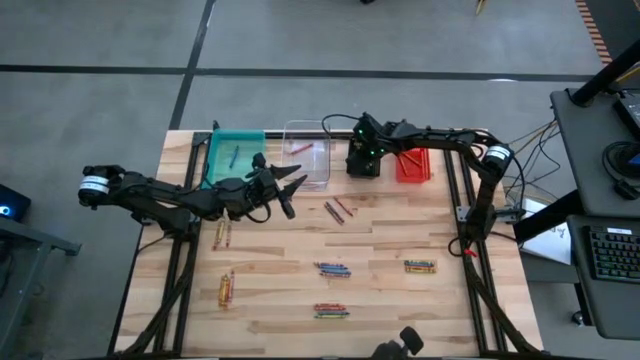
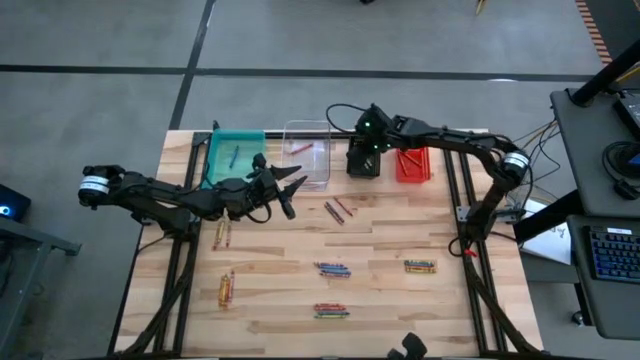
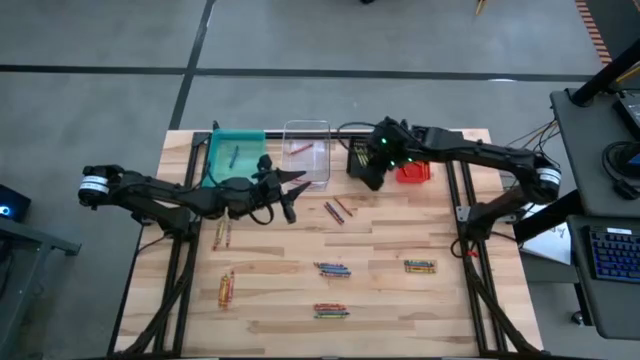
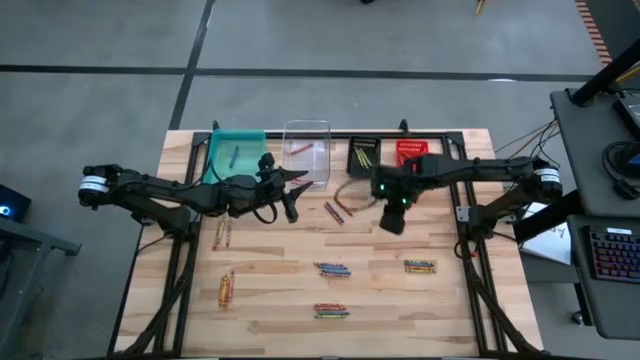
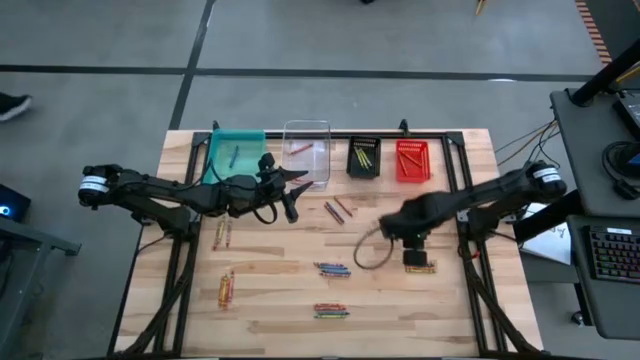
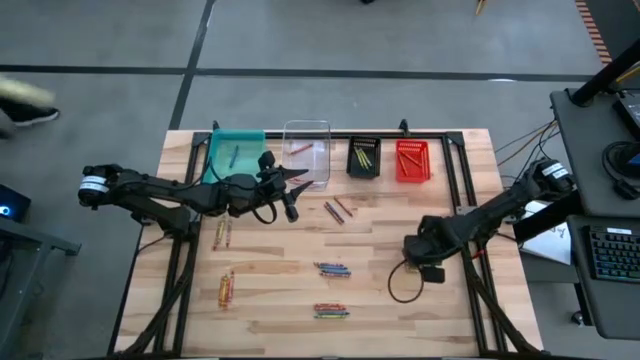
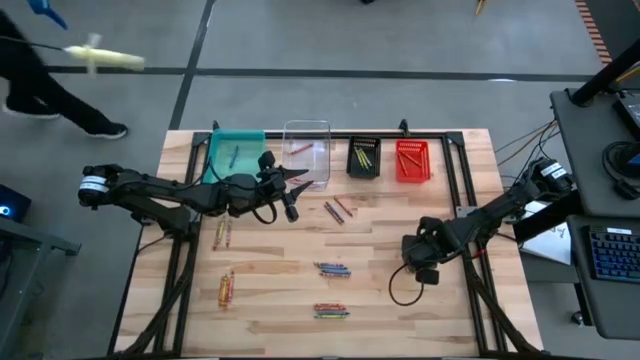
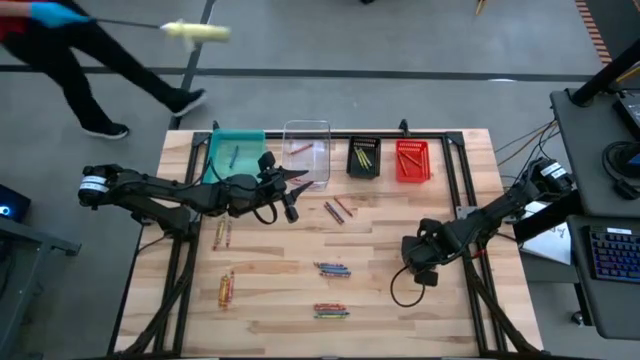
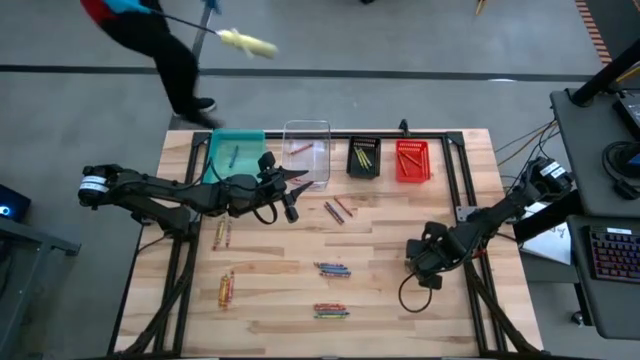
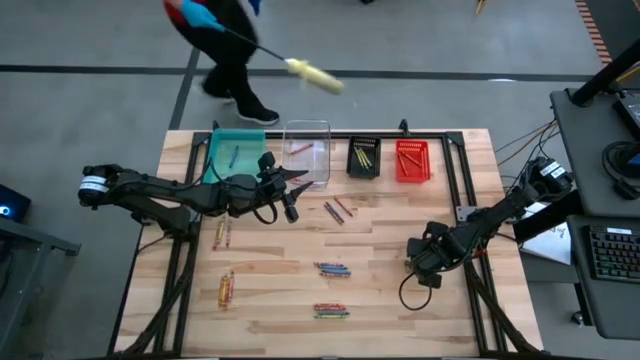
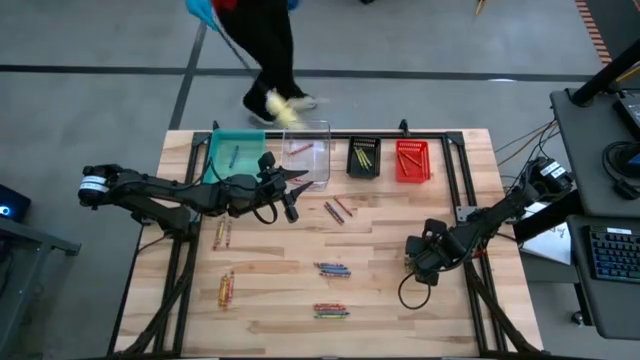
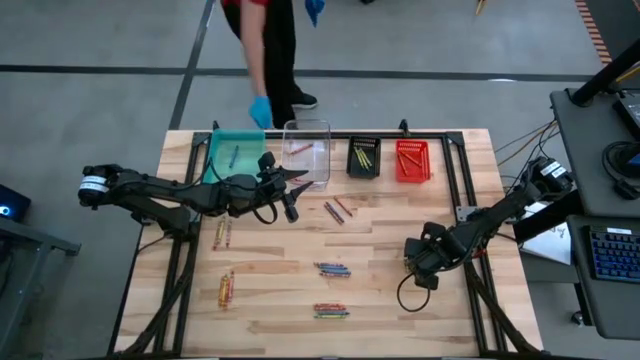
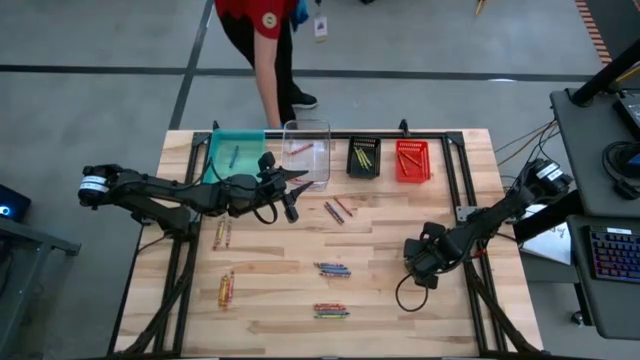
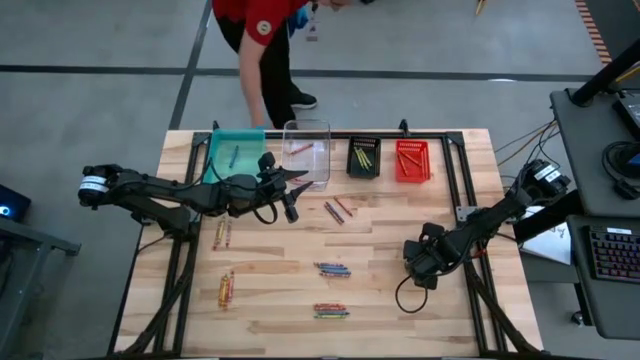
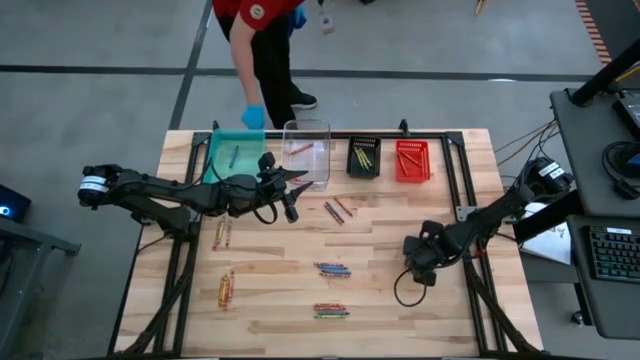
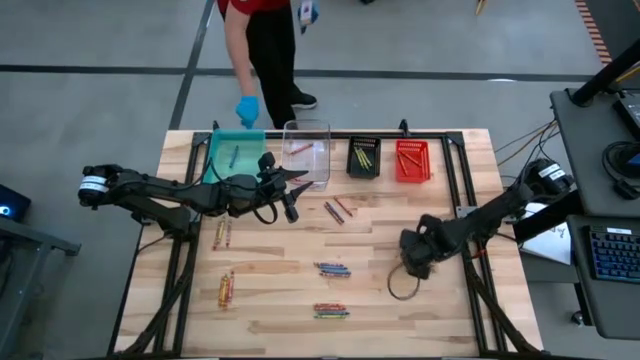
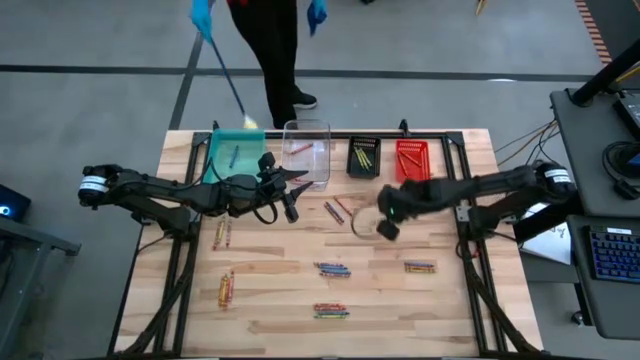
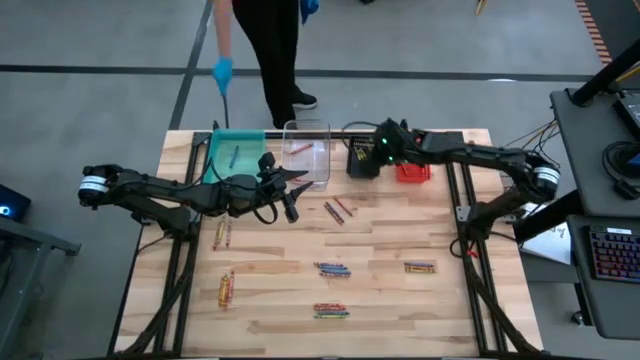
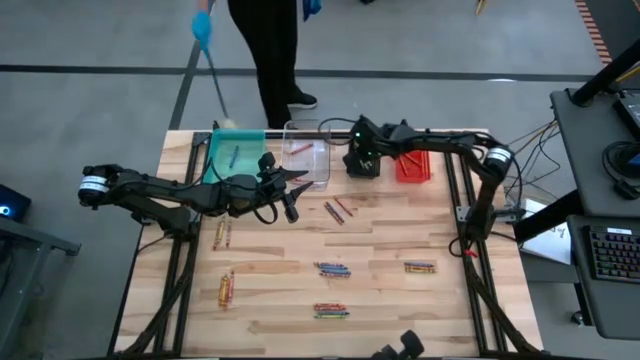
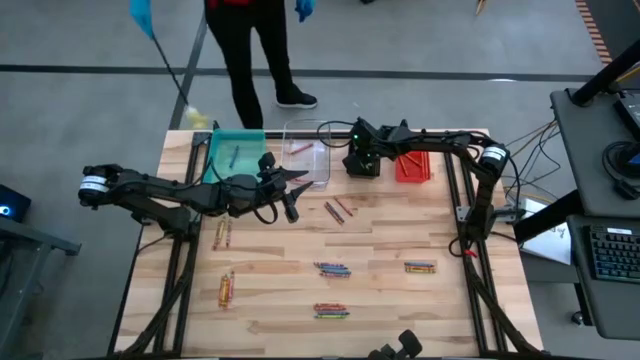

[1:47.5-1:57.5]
Task: Sort crayons
Put the green crayon into the black bin

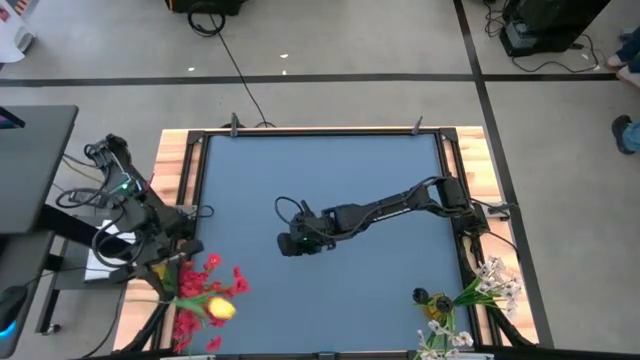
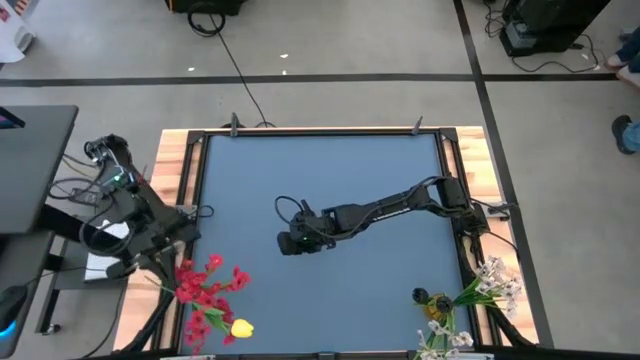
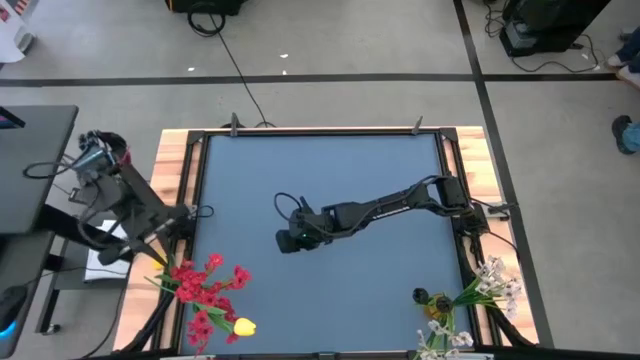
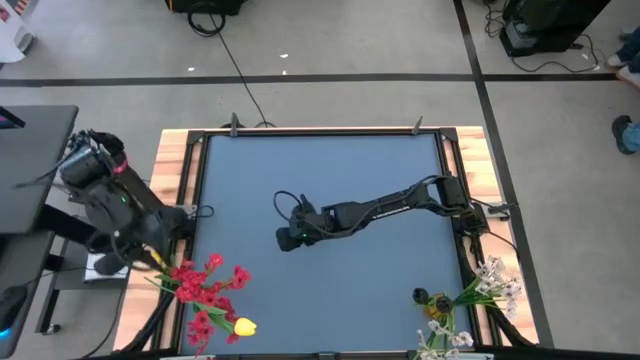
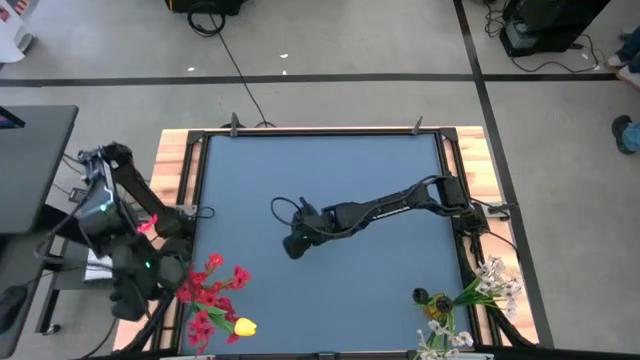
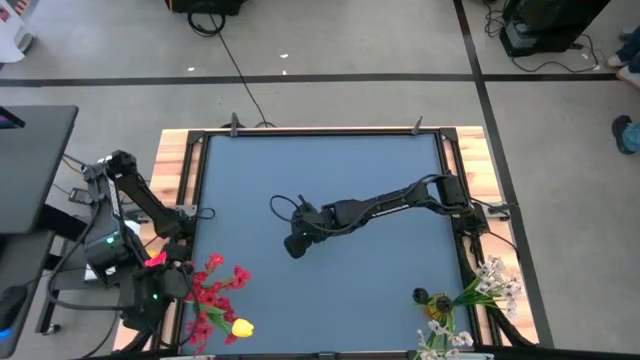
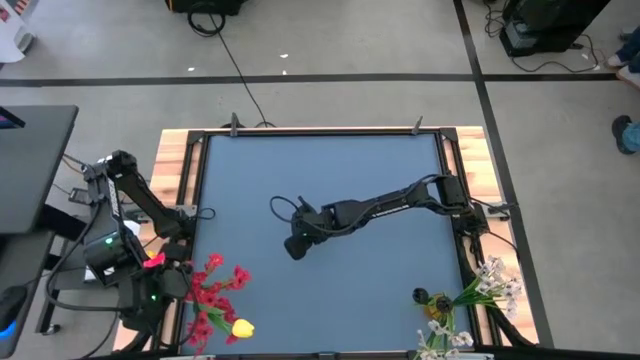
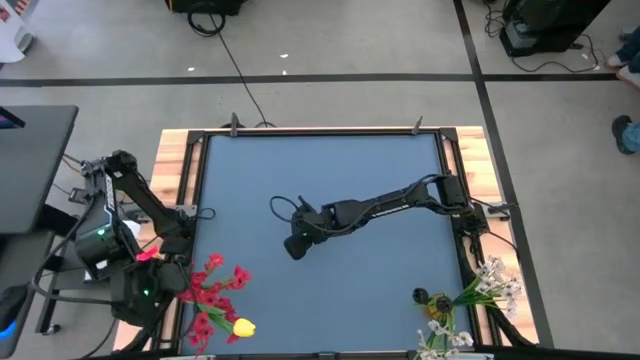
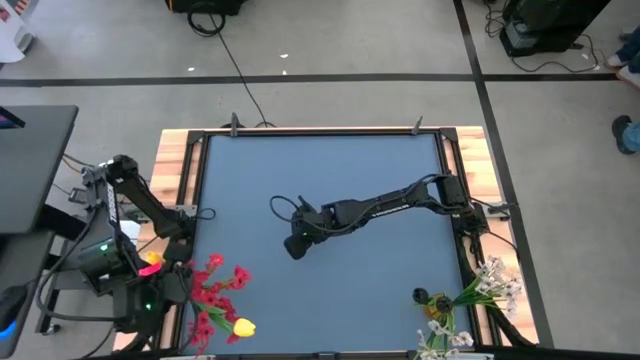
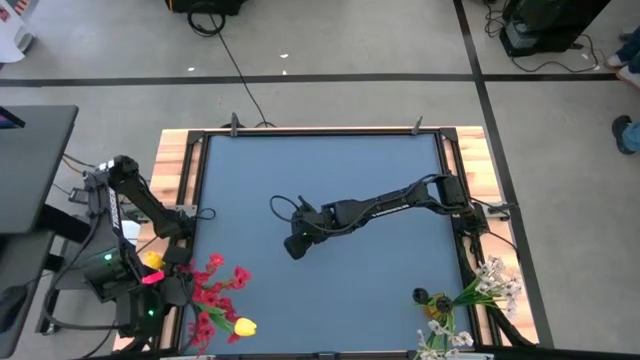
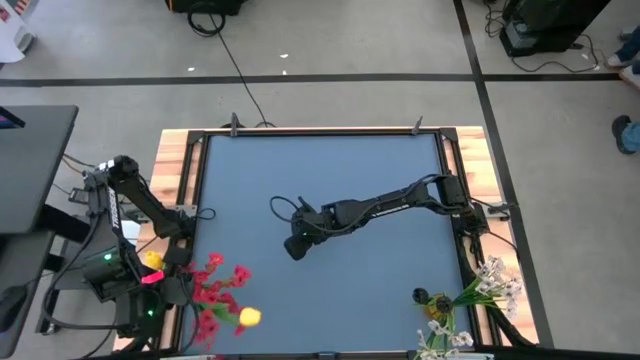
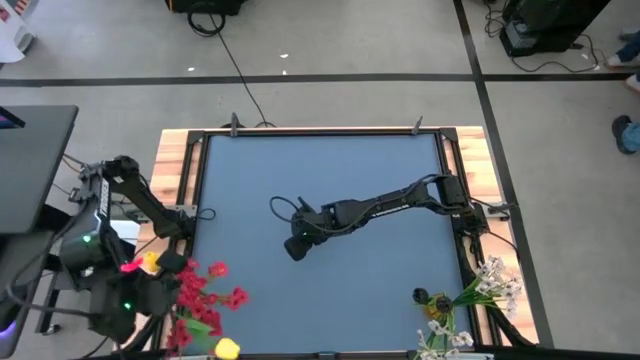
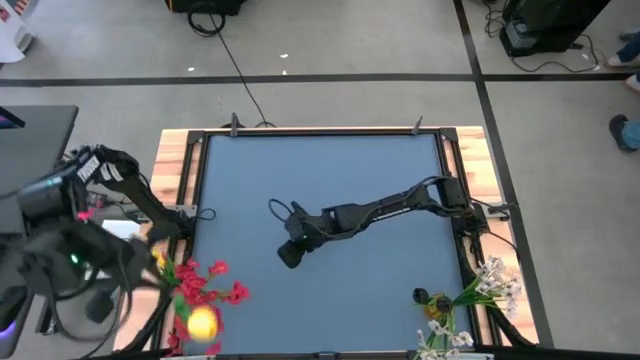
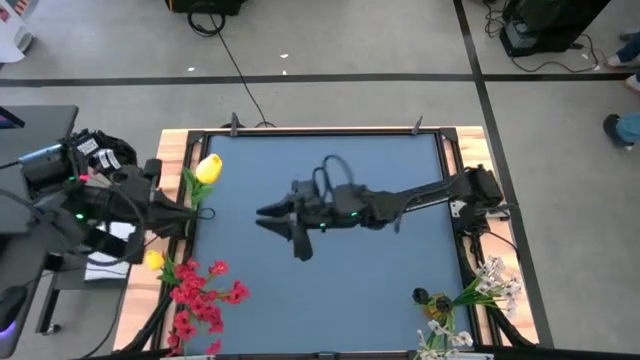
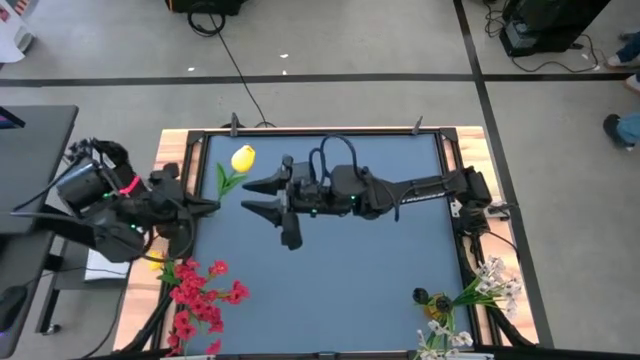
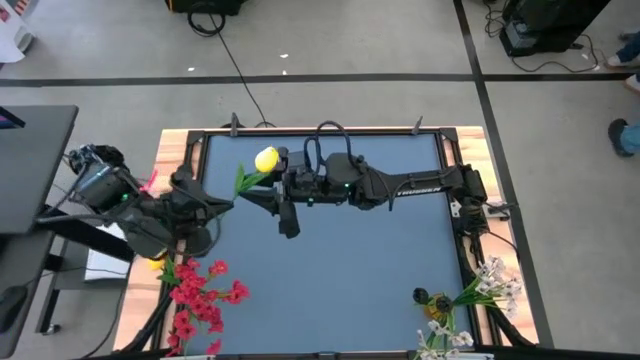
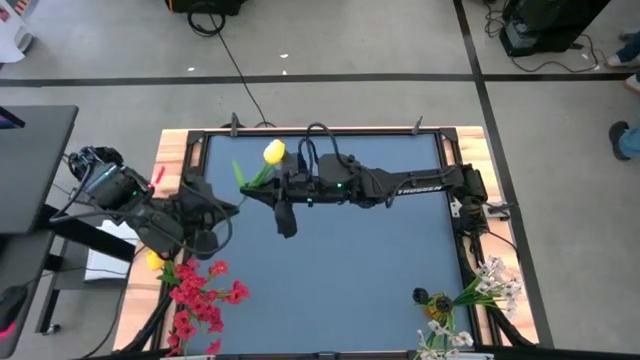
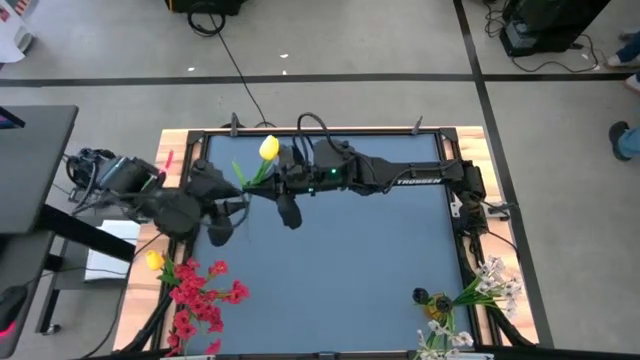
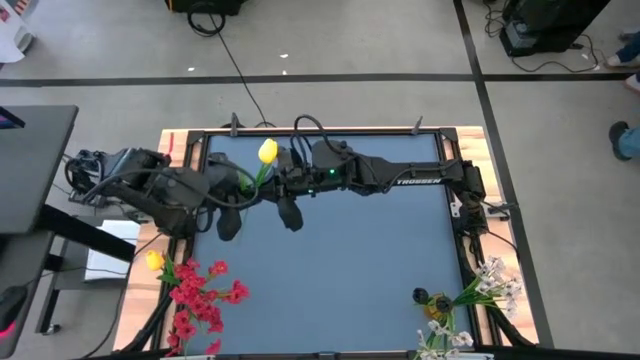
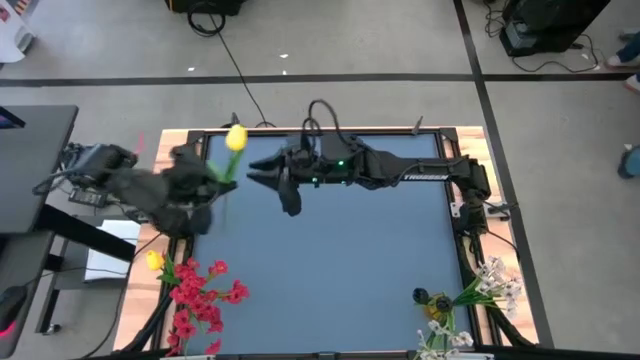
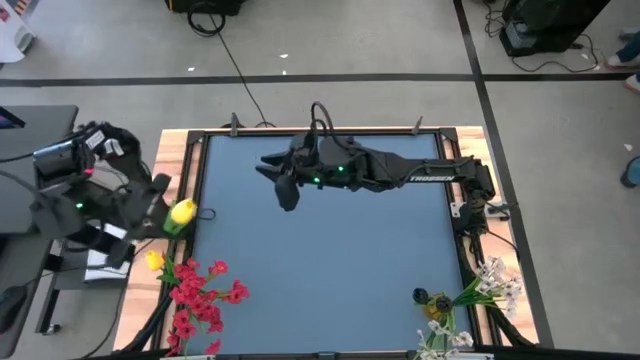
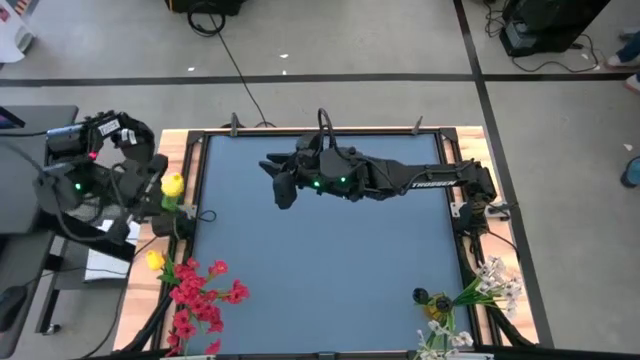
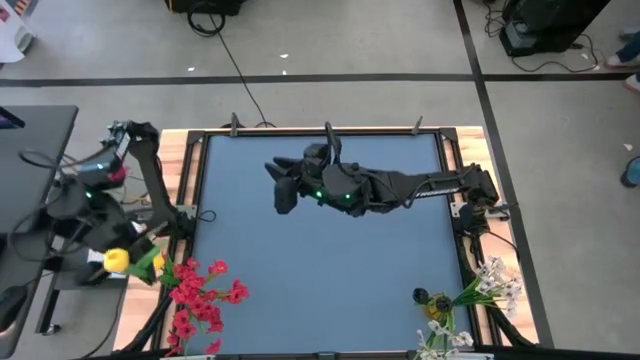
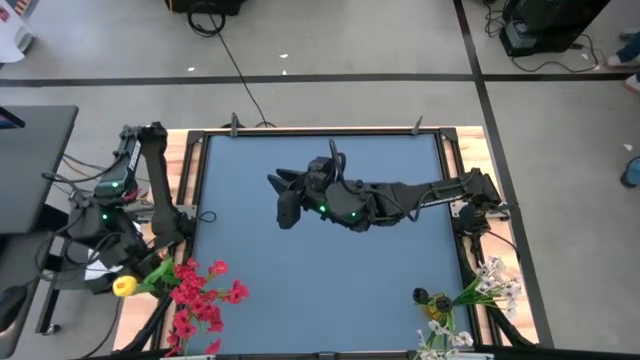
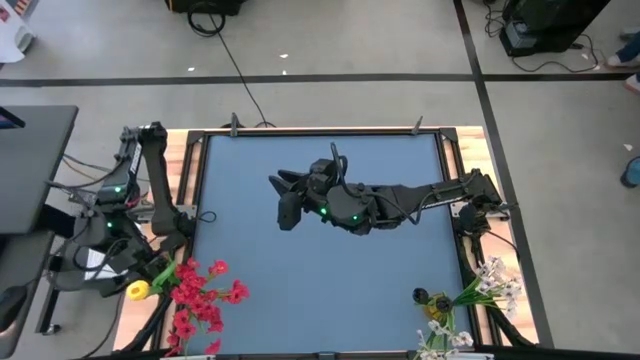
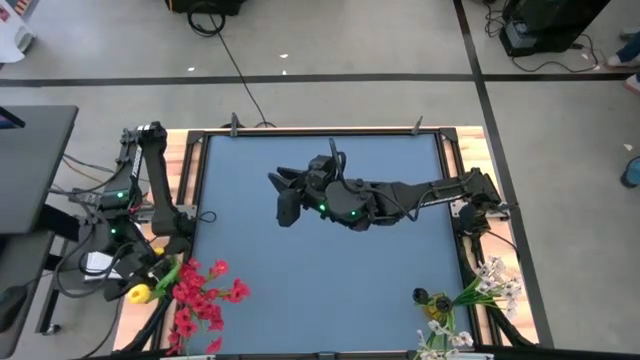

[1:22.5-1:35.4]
Task: Sort flowers into vase by color
Put the yellow flower into the transparent flower vase
